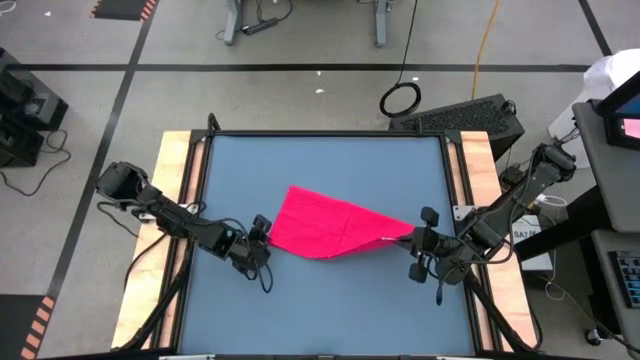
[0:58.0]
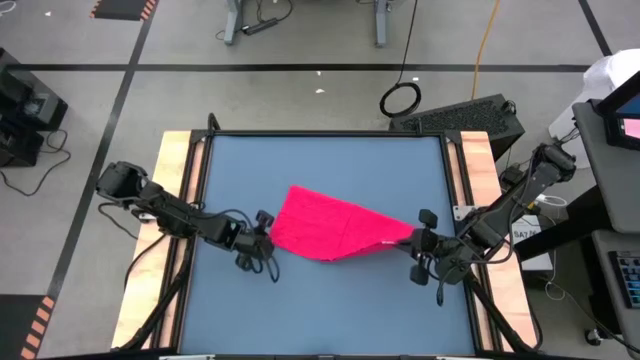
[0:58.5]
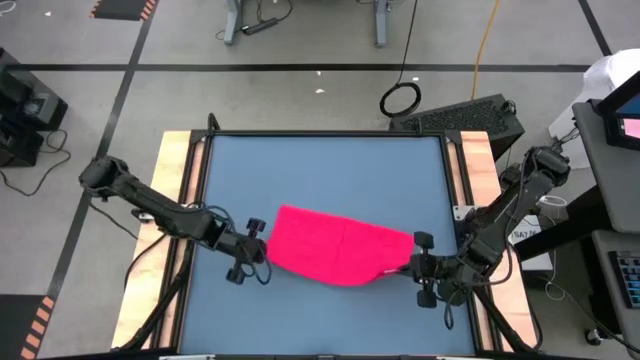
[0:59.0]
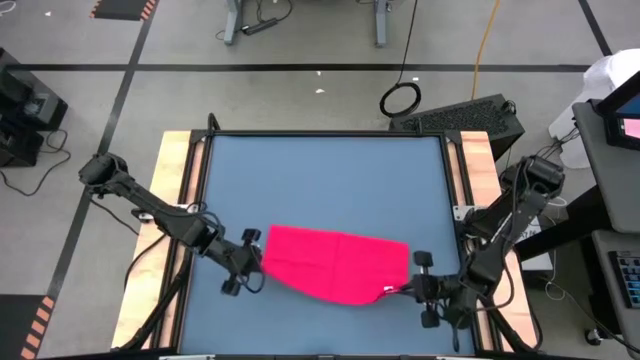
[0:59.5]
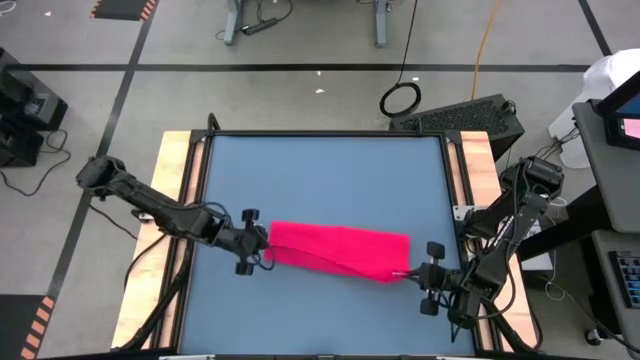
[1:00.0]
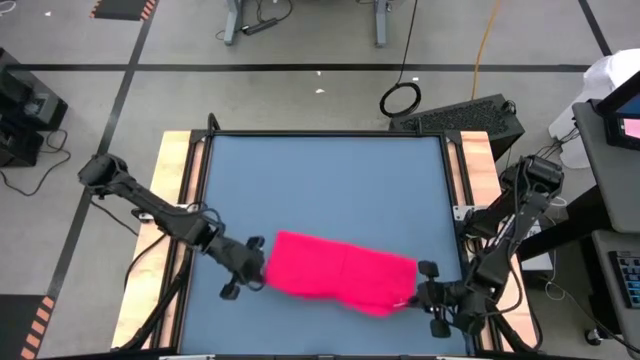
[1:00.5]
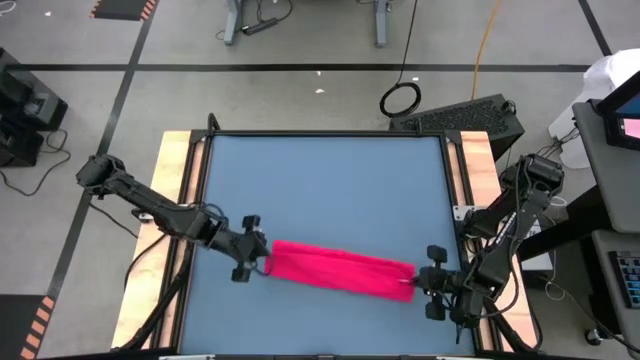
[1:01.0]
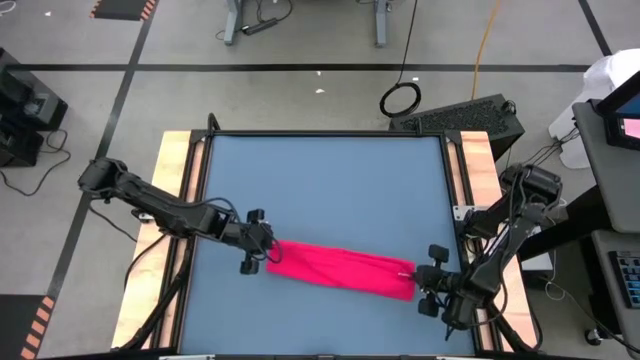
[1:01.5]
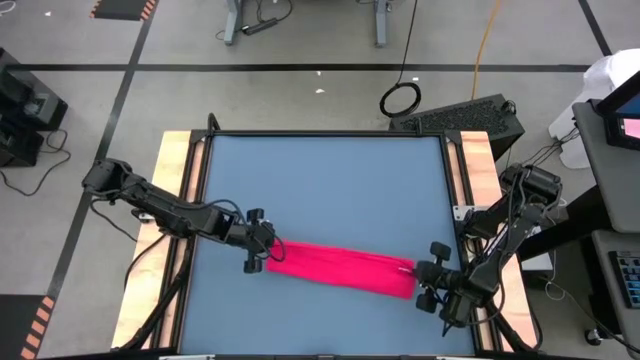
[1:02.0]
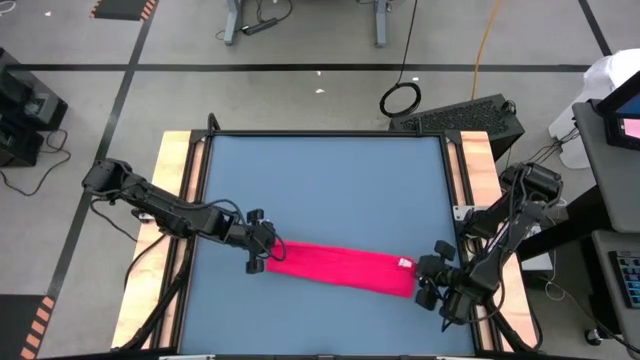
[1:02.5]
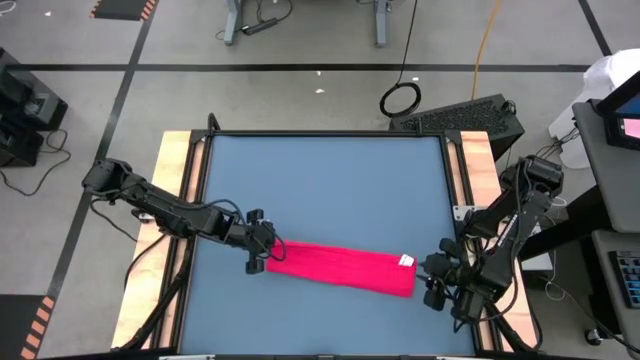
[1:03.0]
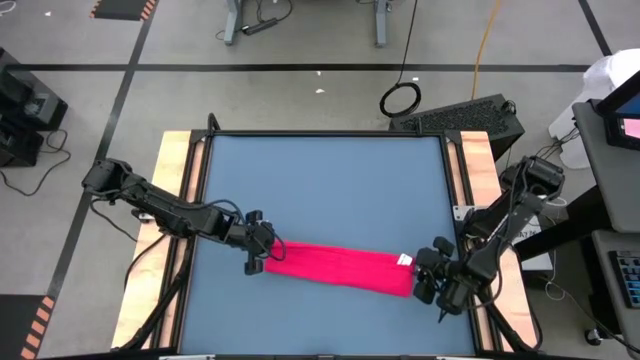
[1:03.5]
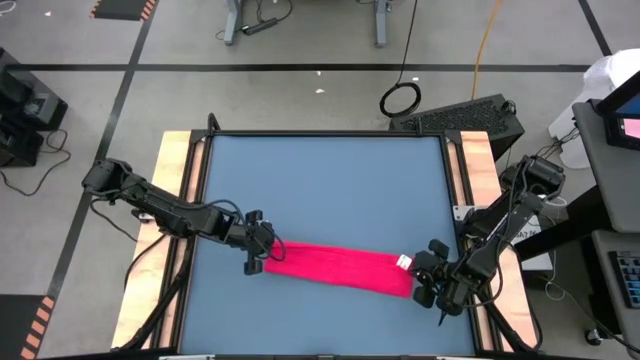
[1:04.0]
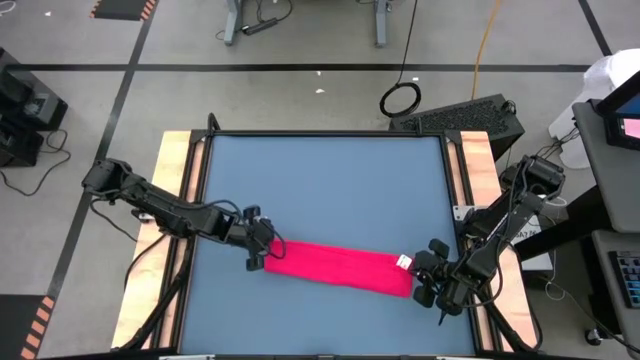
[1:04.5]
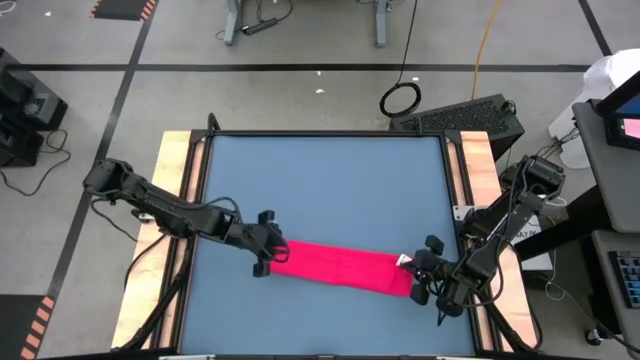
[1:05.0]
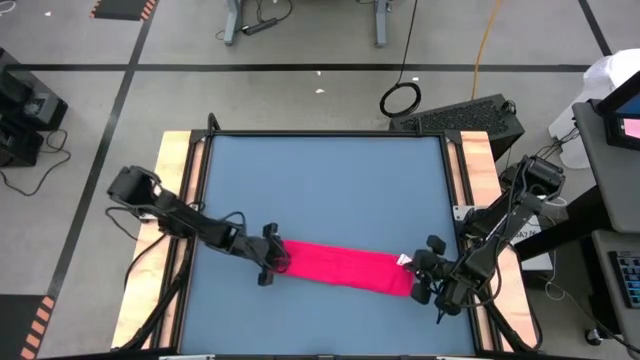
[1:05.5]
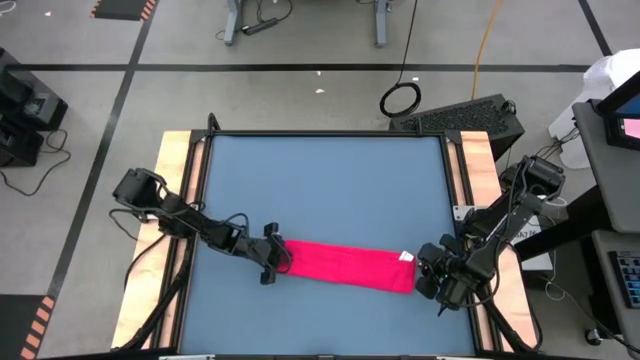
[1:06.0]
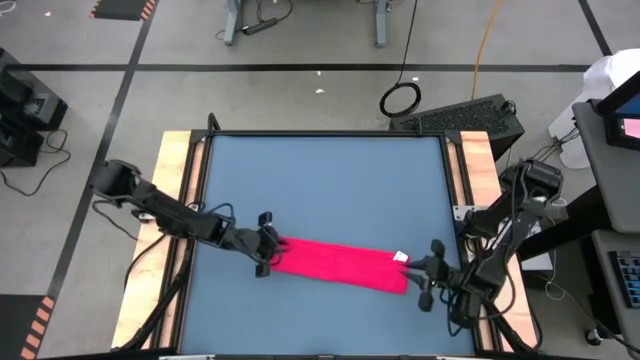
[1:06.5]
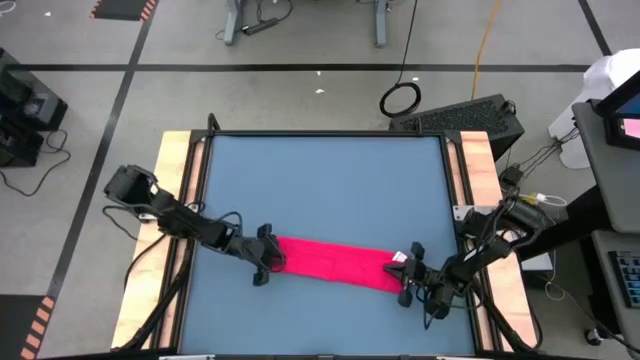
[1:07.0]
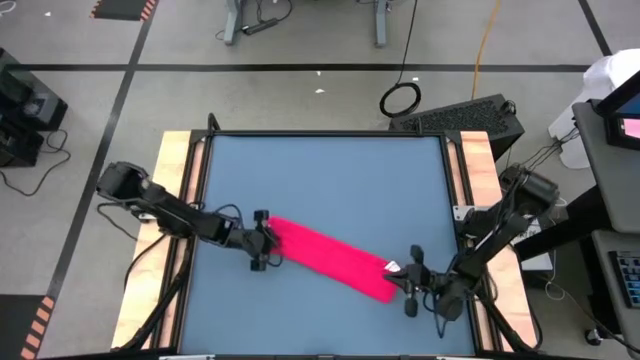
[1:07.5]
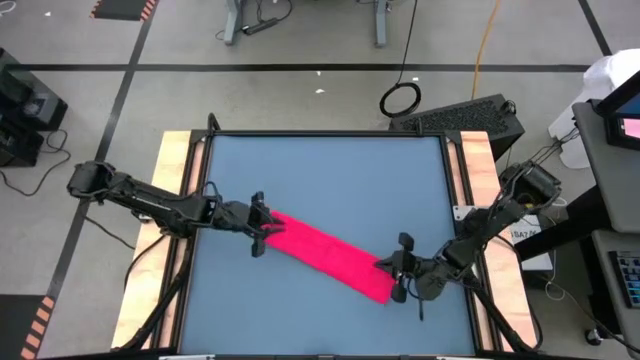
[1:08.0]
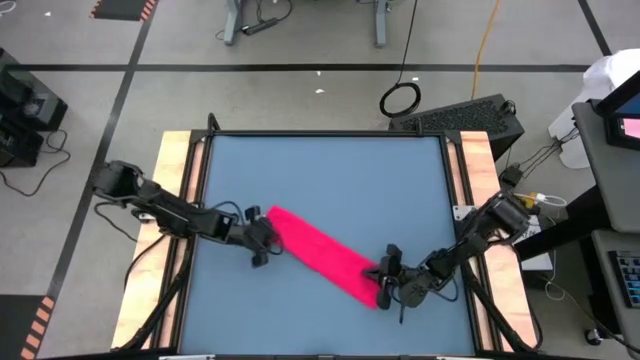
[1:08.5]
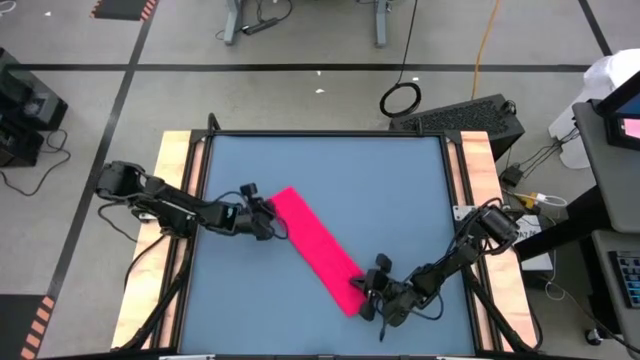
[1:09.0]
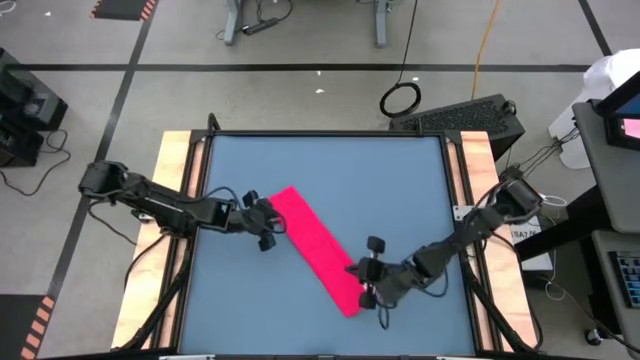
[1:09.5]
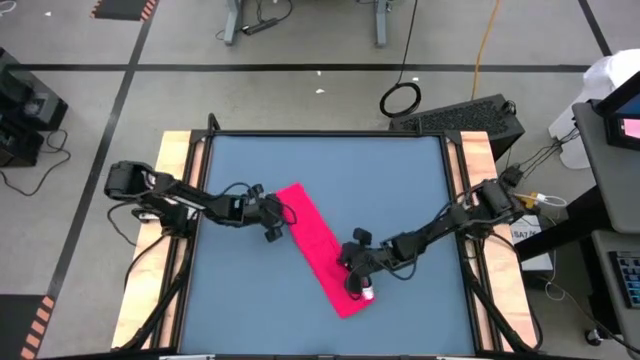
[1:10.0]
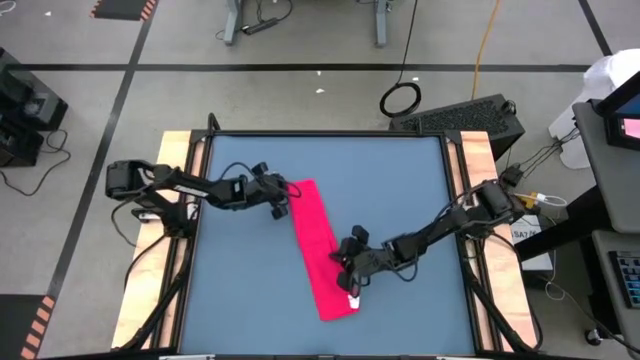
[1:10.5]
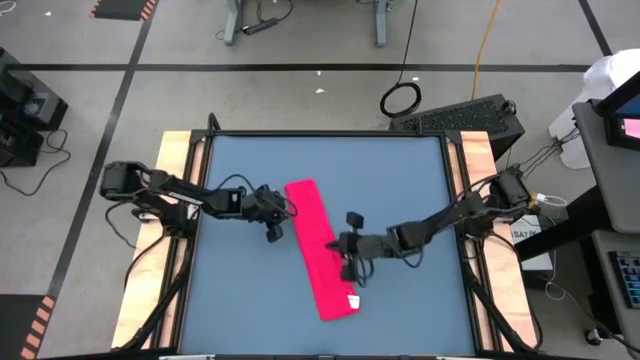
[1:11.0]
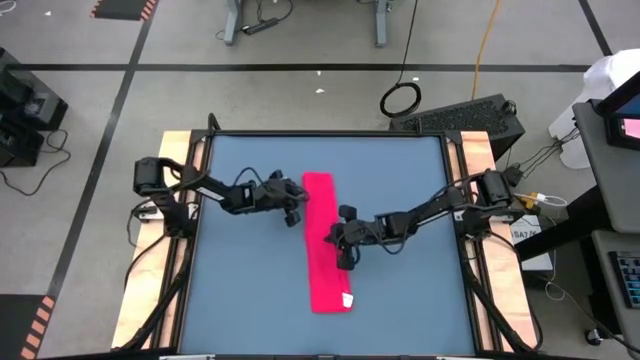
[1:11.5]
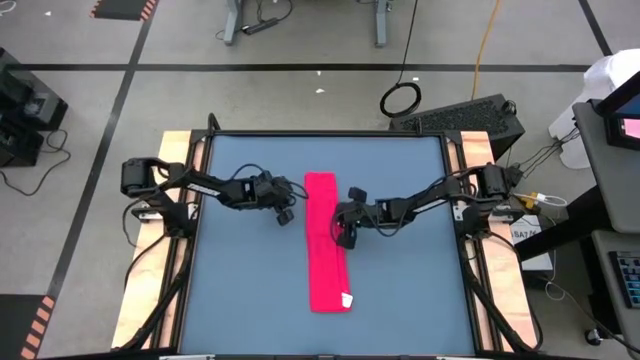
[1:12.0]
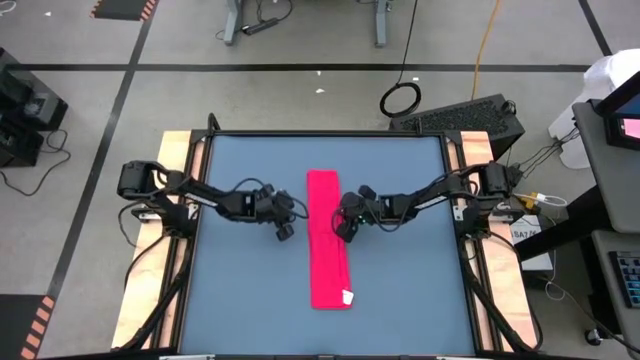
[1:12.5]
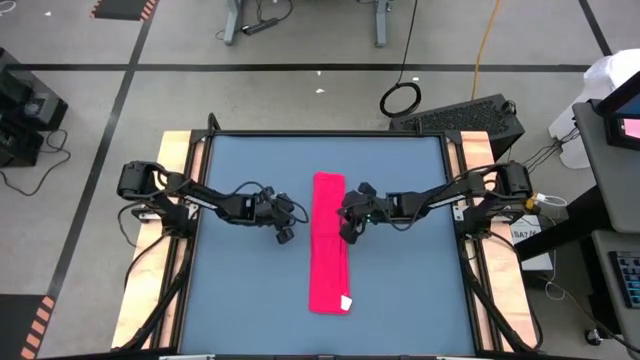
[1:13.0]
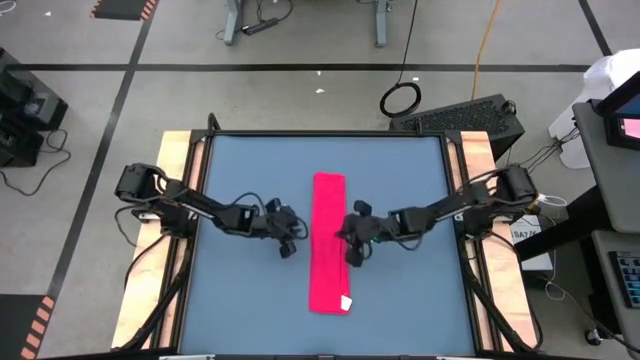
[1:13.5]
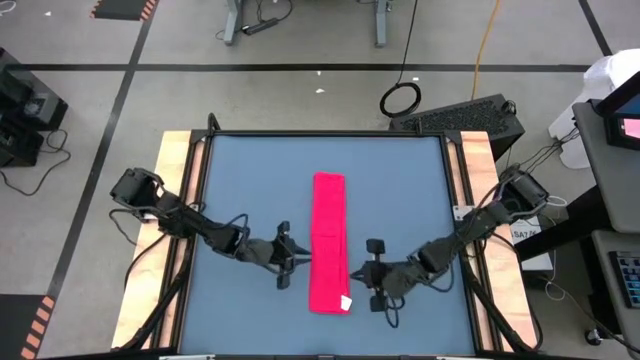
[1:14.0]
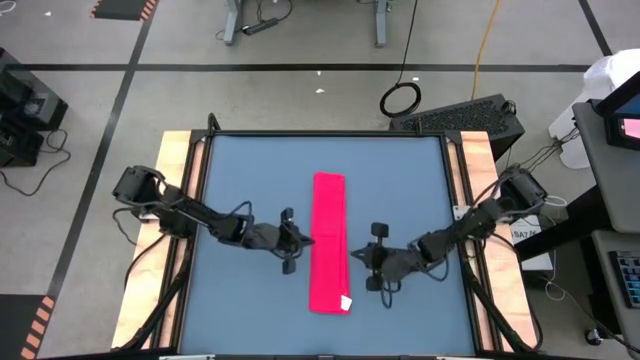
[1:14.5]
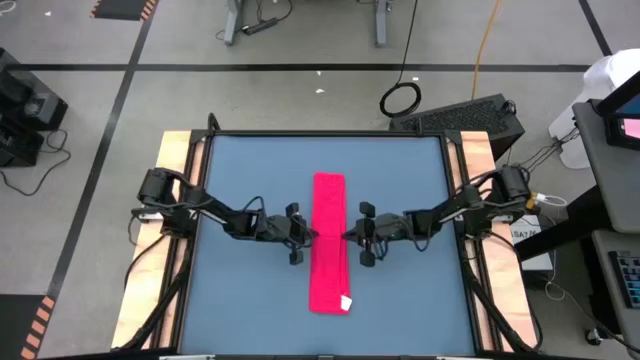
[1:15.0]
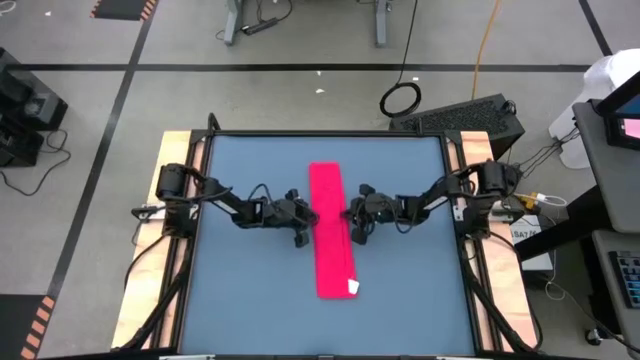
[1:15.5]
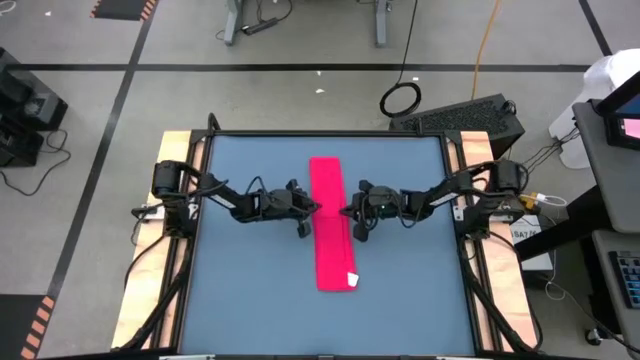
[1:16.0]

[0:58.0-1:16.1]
Task: Roll towel
Fold the red towel

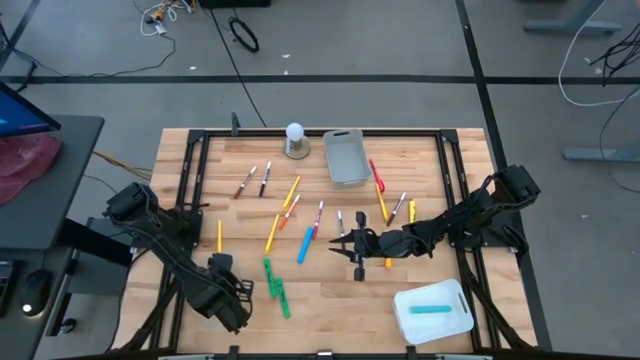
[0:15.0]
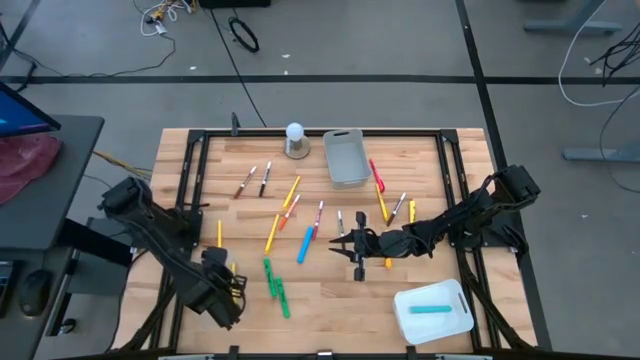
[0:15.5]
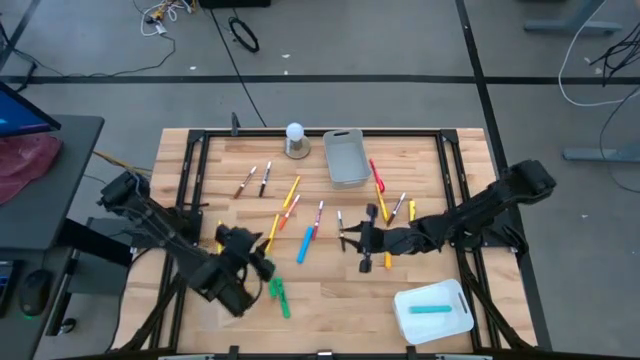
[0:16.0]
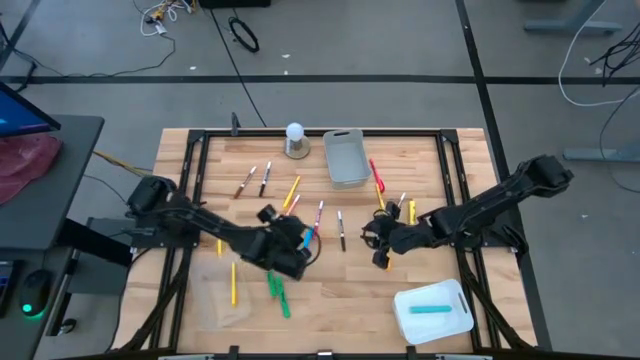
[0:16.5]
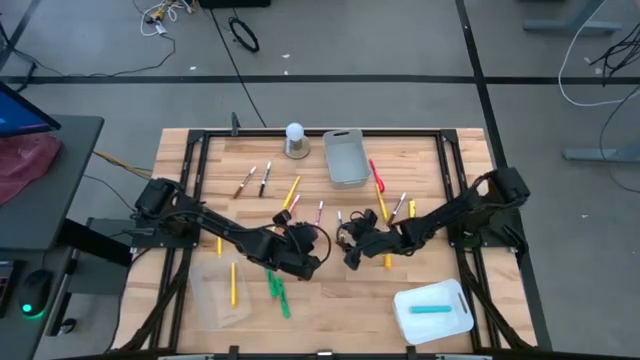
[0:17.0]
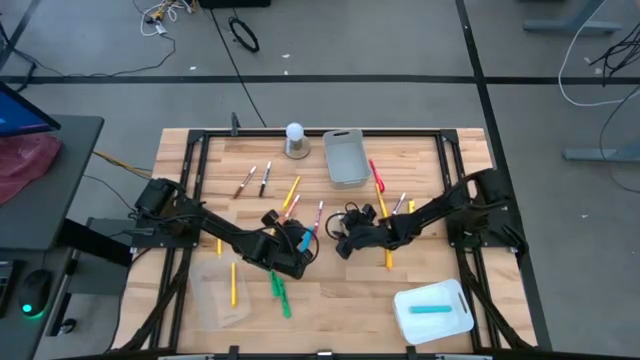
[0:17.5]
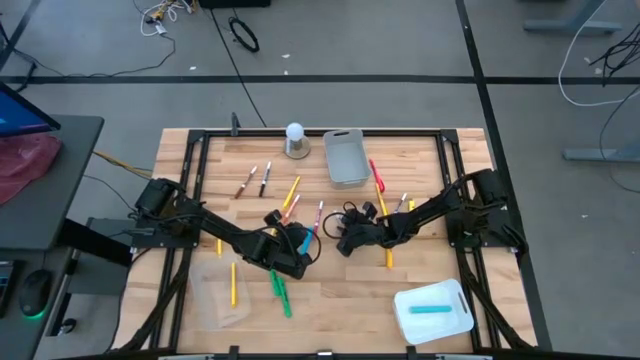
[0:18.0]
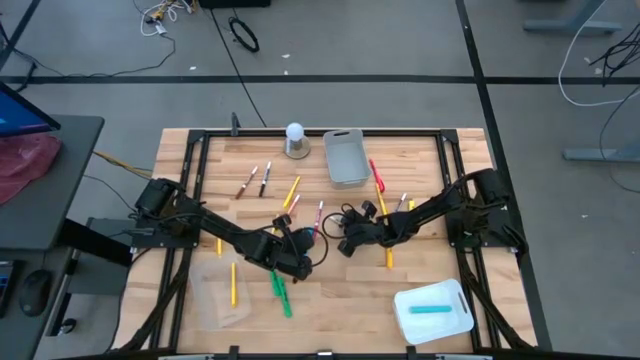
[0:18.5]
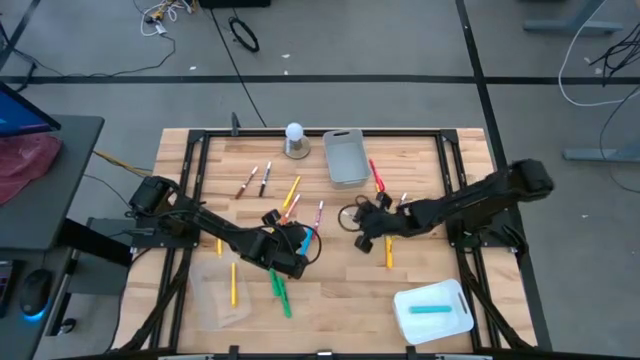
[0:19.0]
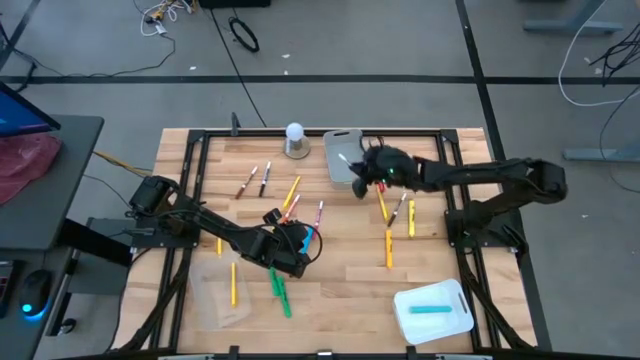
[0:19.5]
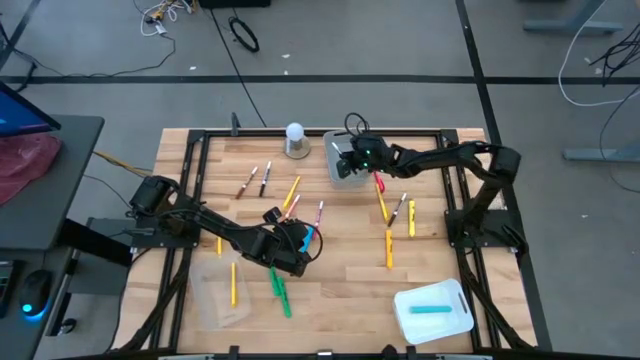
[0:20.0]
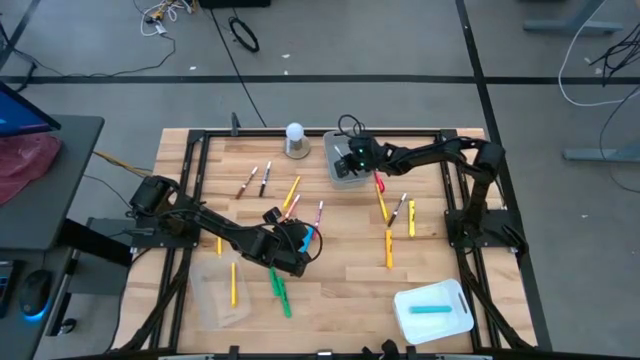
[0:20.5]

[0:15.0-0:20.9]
Task: Pick & Place Markers
Put the dark brown marker pen into the gray bin
